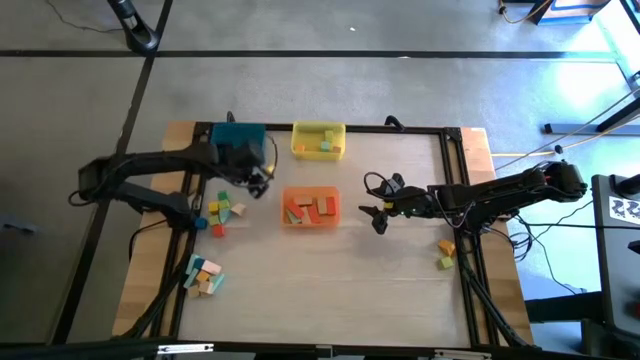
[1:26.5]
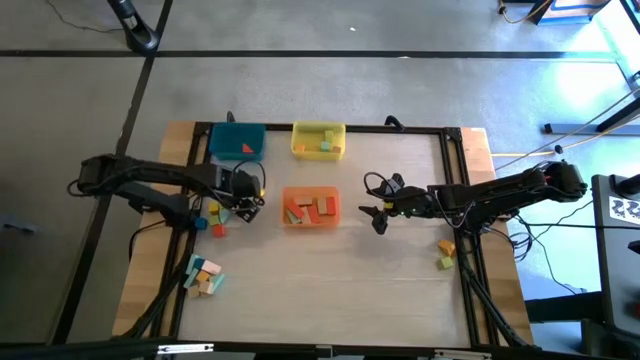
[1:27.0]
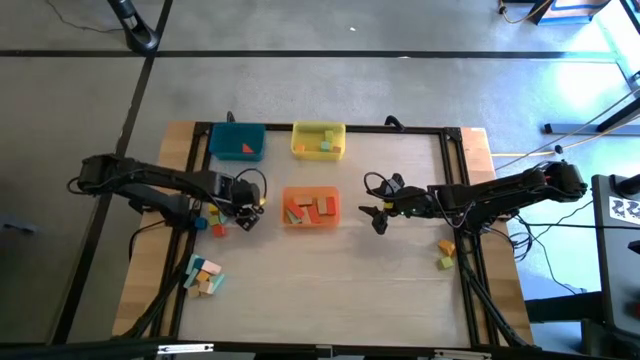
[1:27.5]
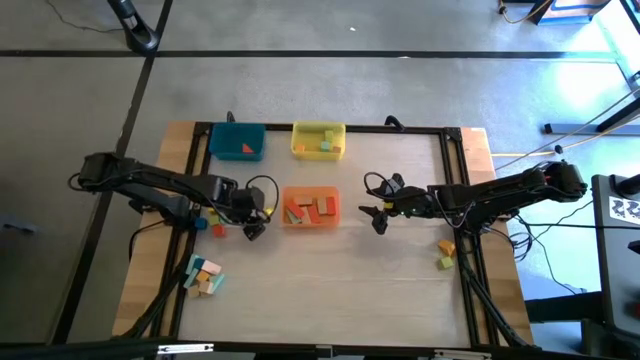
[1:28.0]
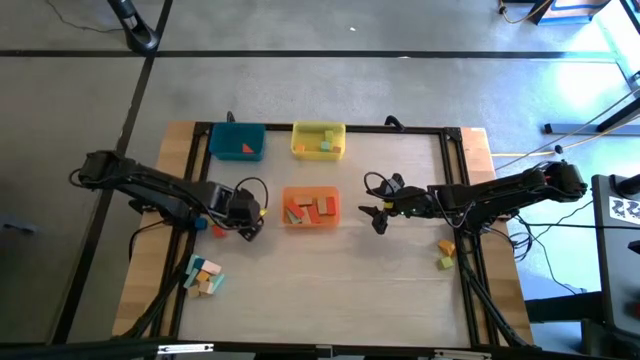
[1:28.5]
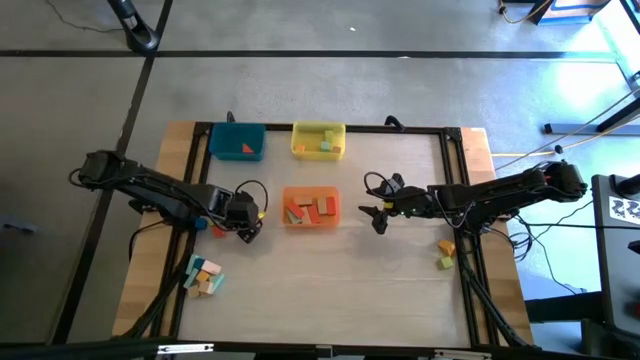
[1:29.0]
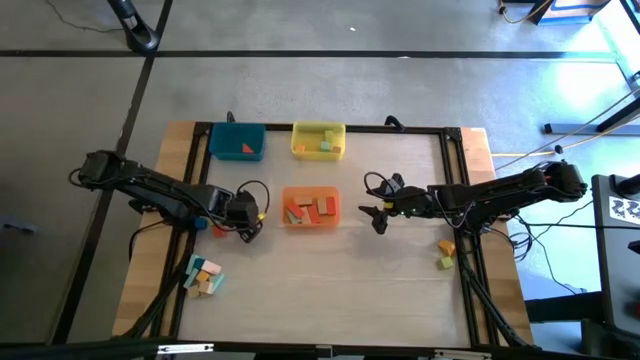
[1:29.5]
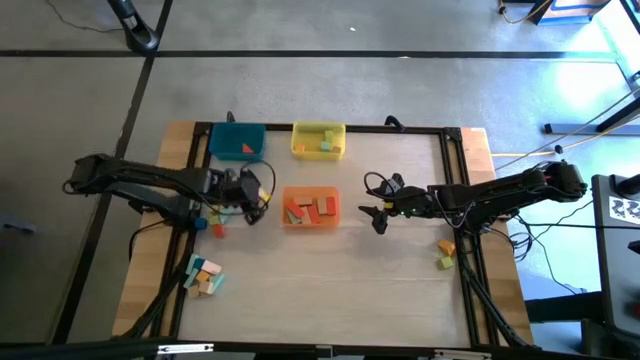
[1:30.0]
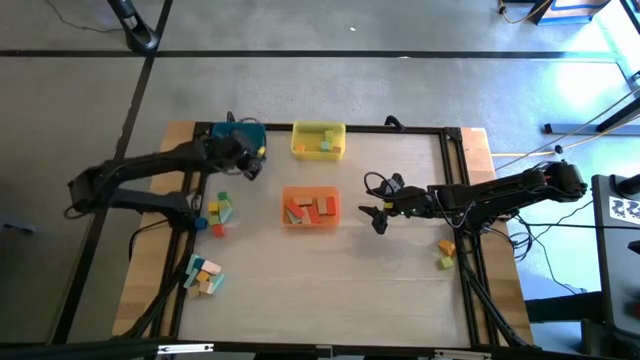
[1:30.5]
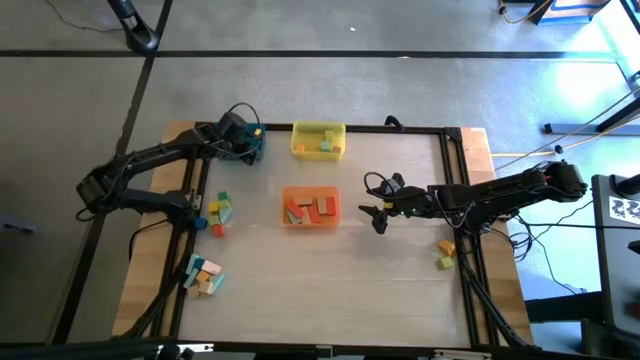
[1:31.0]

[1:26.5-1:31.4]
Task: Sort blocks by size
Put the brown triangle block into the blue bin

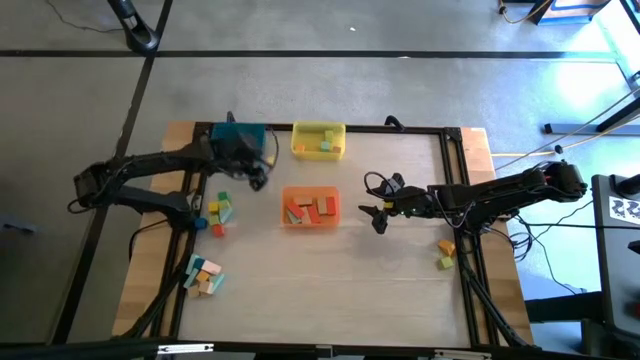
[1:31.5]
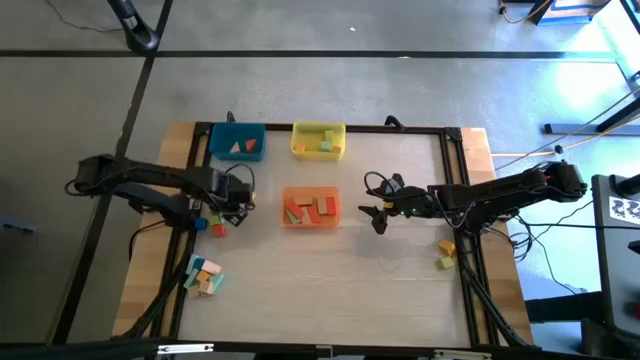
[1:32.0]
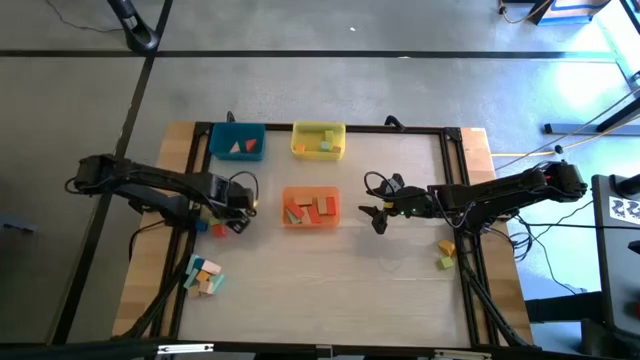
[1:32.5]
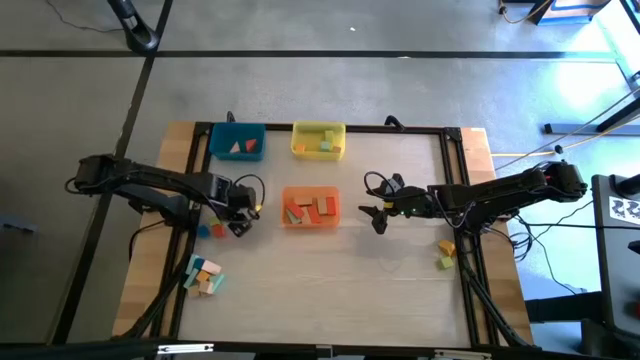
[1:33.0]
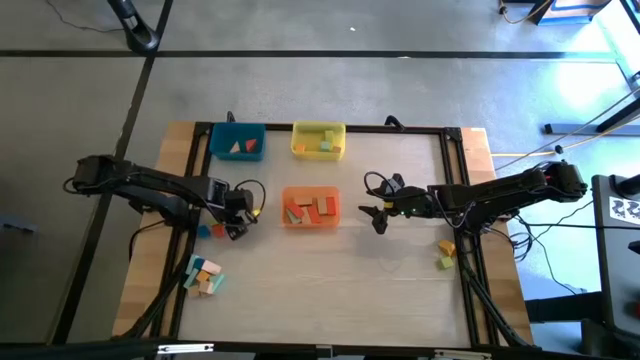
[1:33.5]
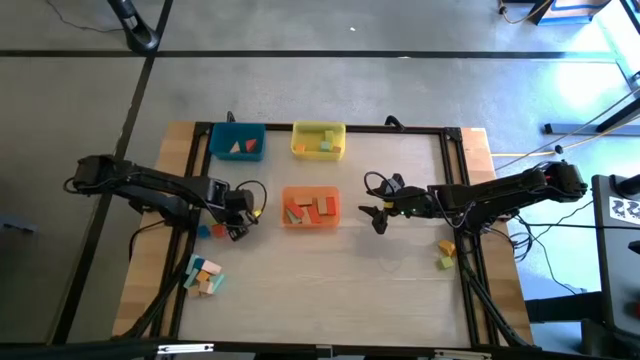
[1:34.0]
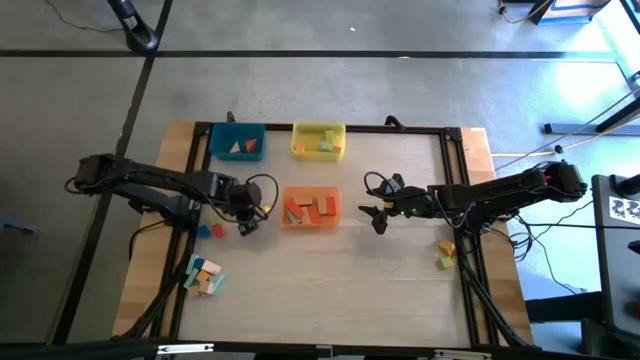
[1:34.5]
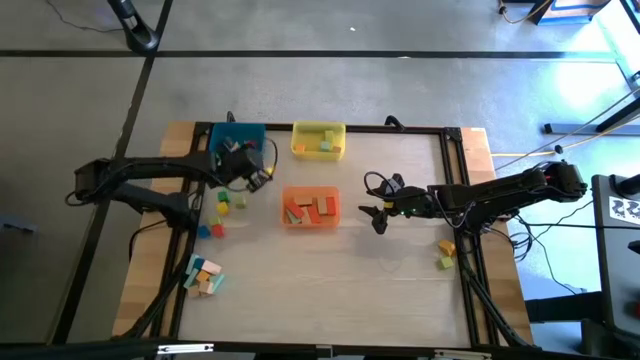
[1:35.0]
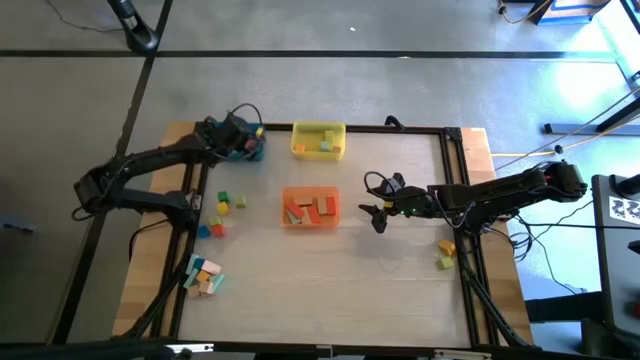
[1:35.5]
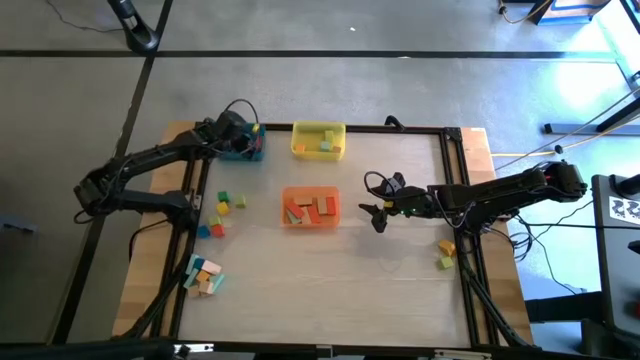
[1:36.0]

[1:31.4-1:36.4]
Put the light blue triangle block into the blue bin

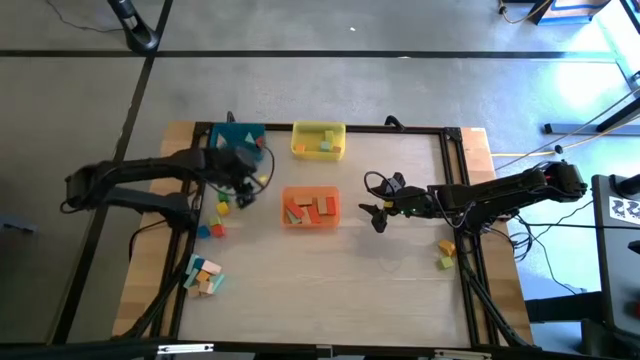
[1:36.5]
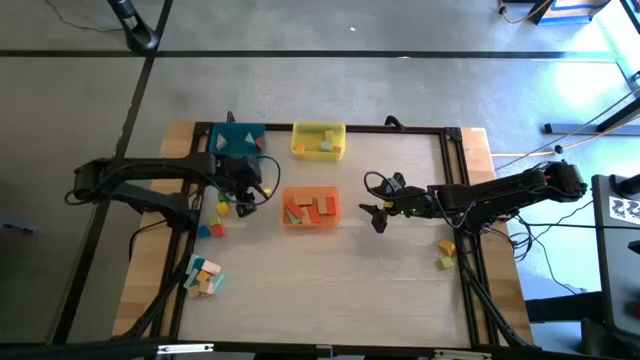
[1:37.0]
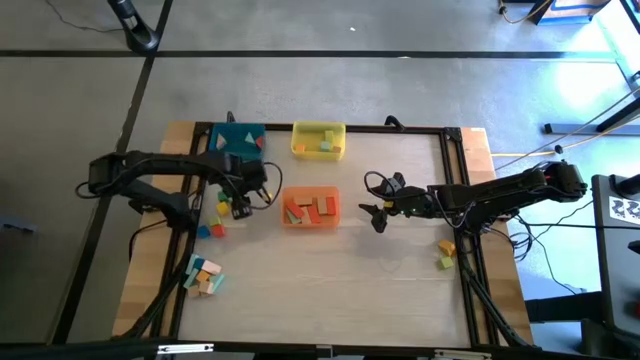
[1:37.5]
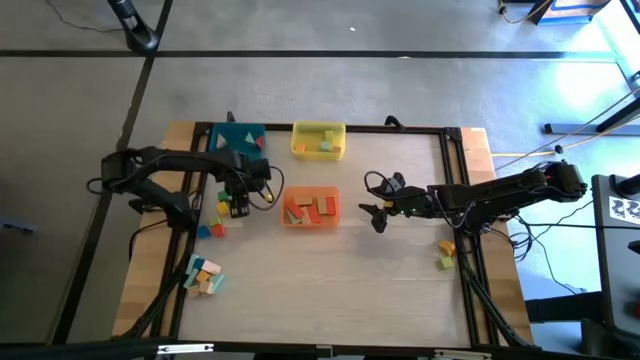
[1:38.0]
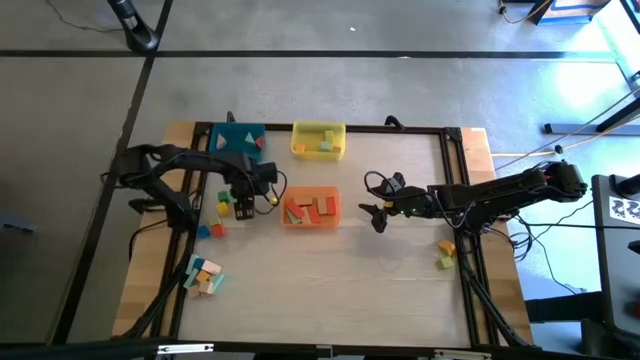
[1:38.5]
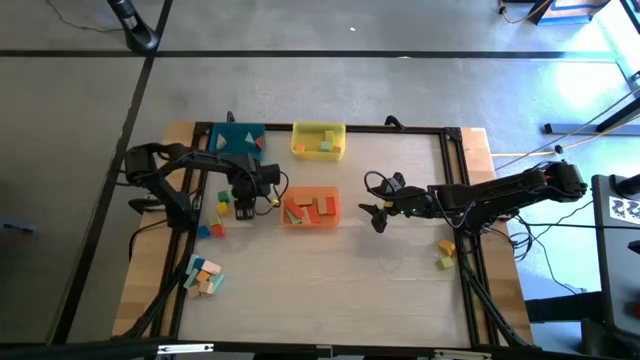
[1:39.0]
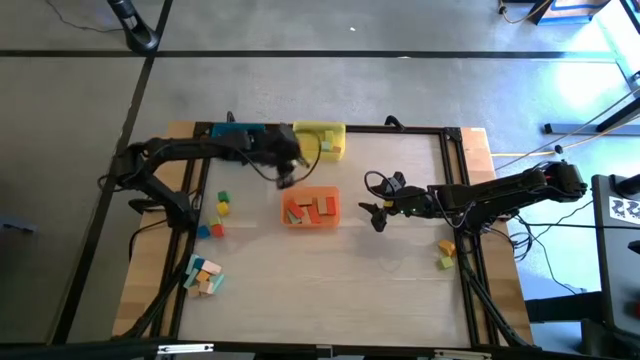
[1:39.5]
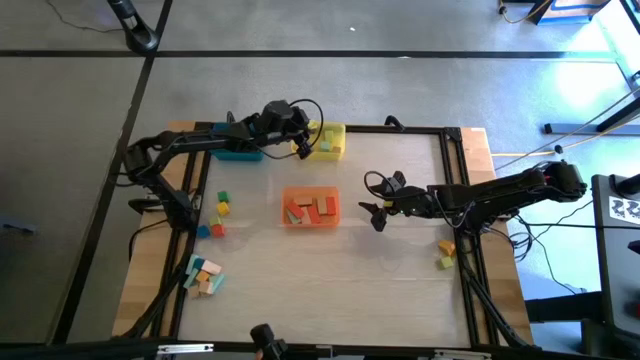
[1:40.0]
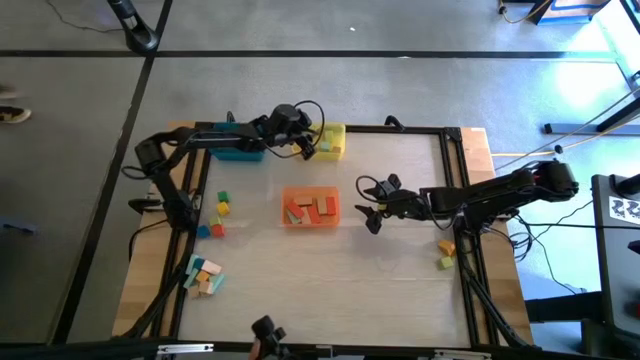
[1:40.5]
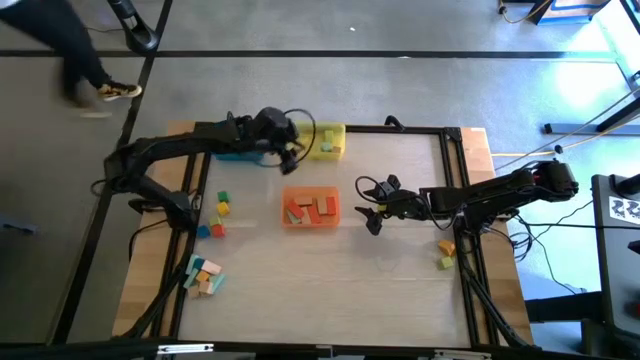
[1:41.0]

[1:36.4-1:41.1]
Put the light green square block into the yellow bin

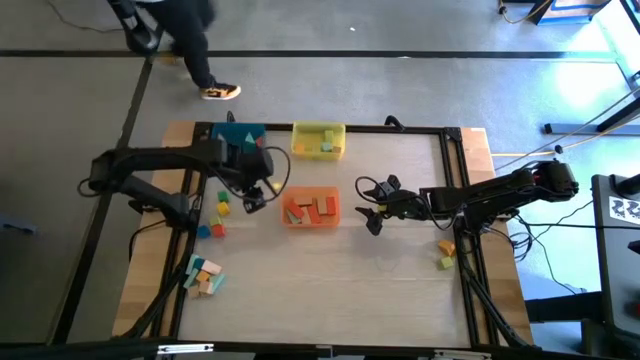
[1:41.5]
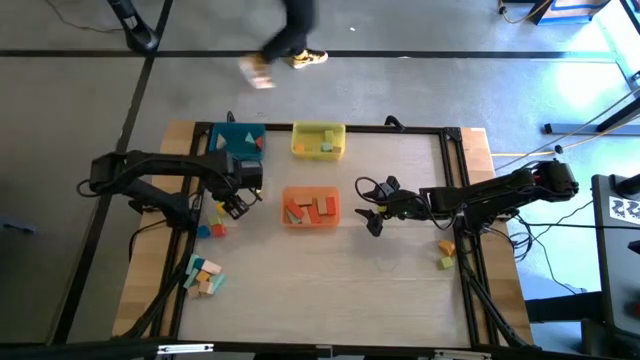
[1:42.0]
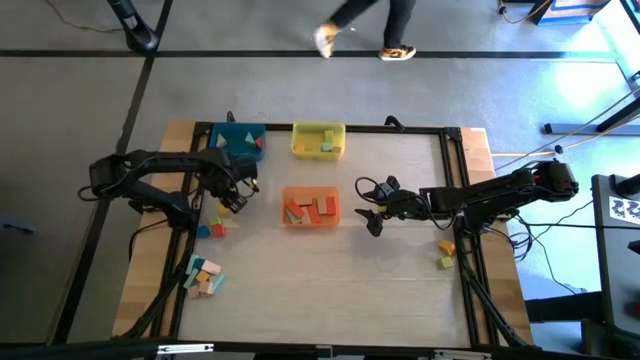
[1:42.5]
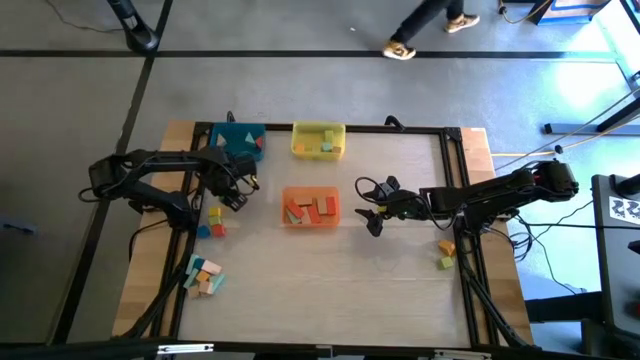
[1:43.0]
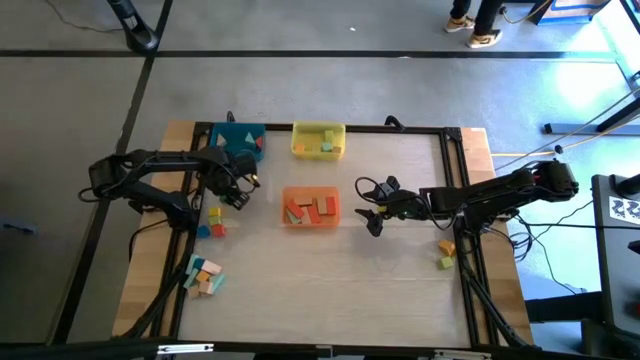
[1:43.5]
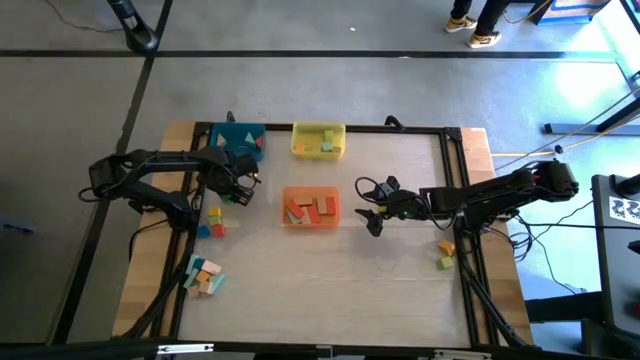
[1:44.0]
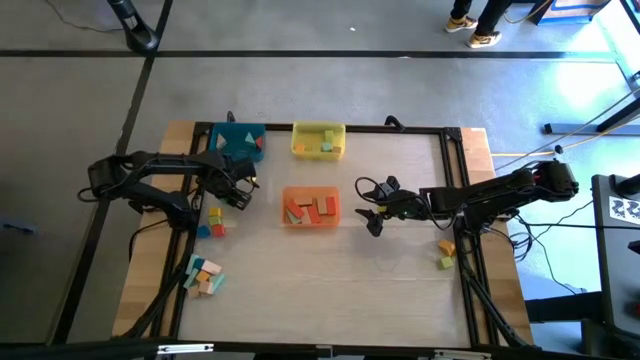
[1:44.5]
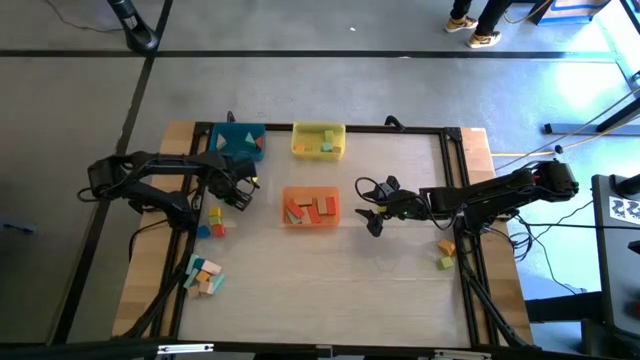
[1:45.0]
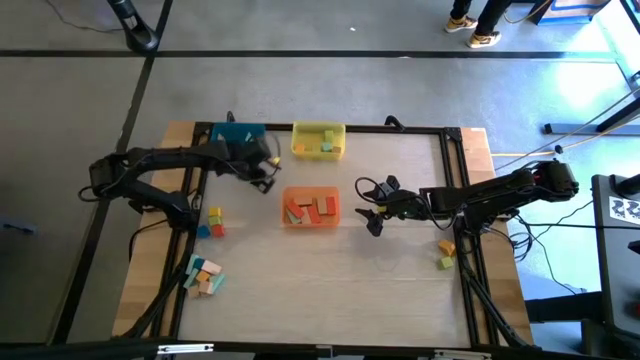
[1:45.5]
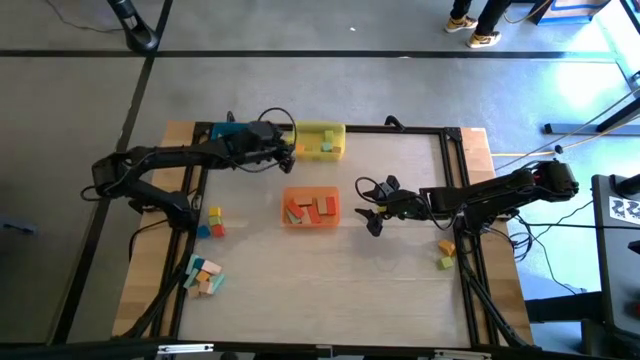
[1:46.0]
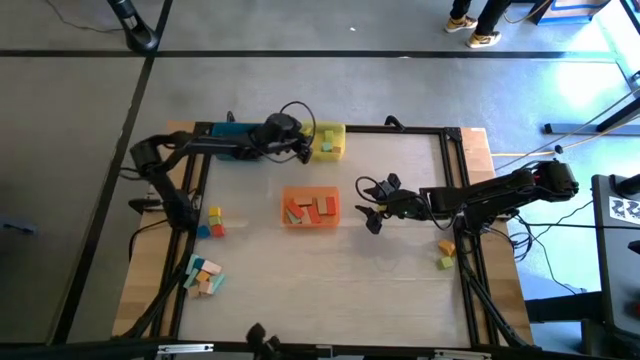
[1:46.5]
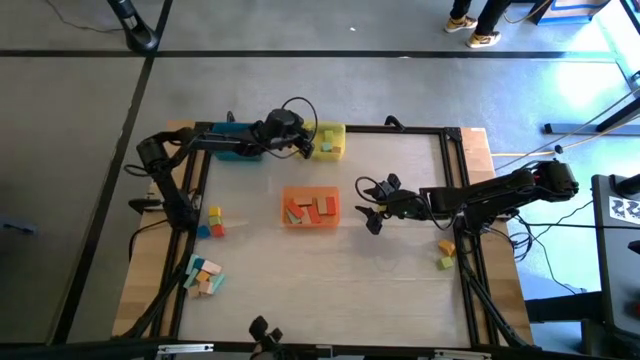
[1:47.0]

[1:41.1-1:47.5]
Put the green square block into the yellow bin
